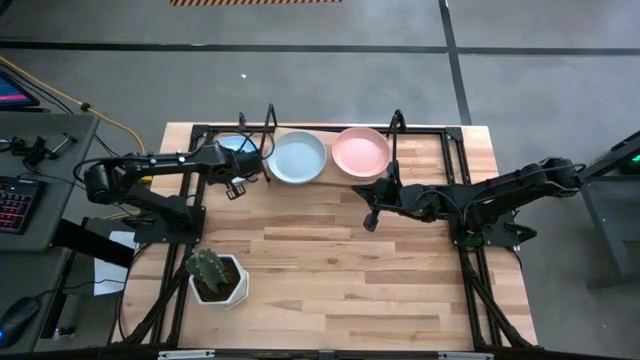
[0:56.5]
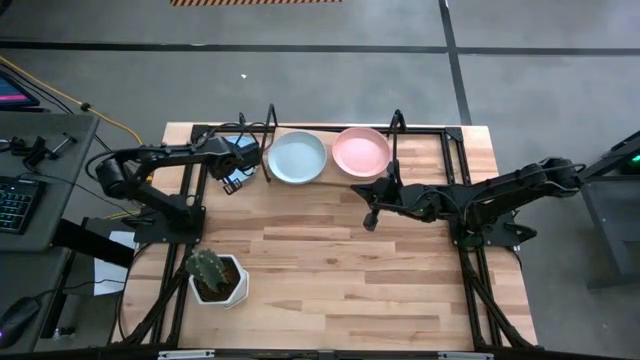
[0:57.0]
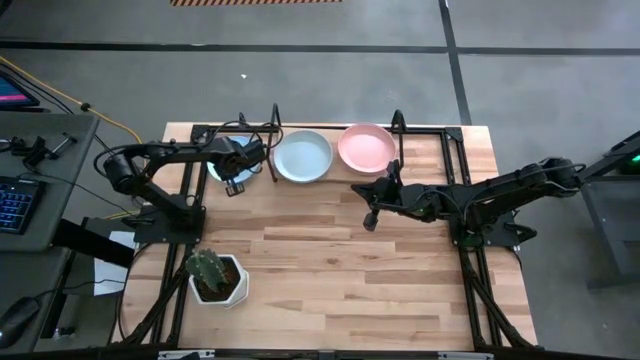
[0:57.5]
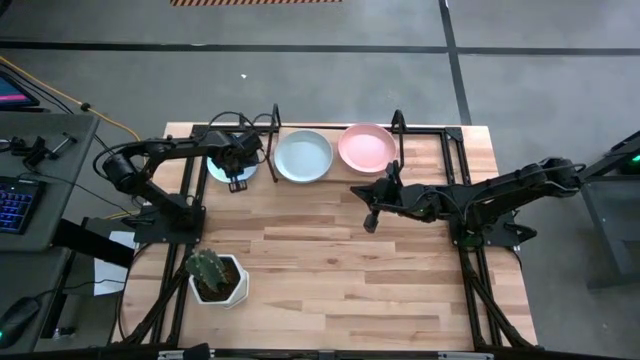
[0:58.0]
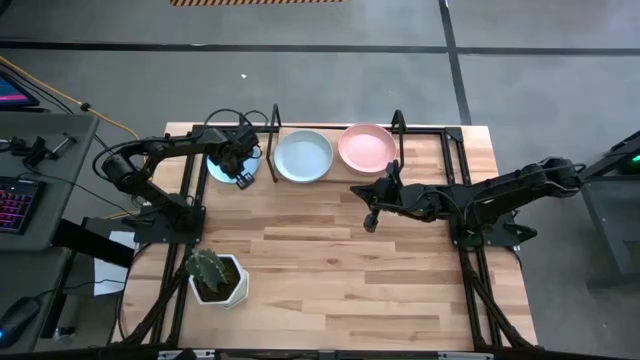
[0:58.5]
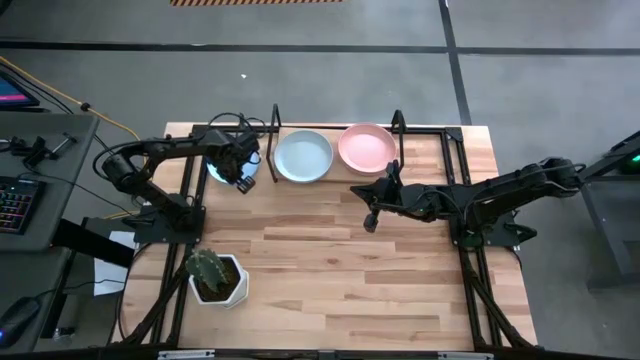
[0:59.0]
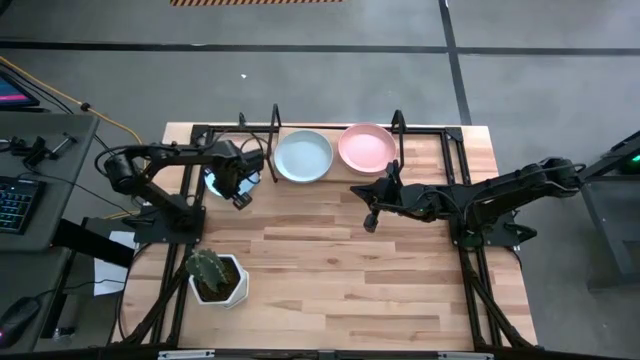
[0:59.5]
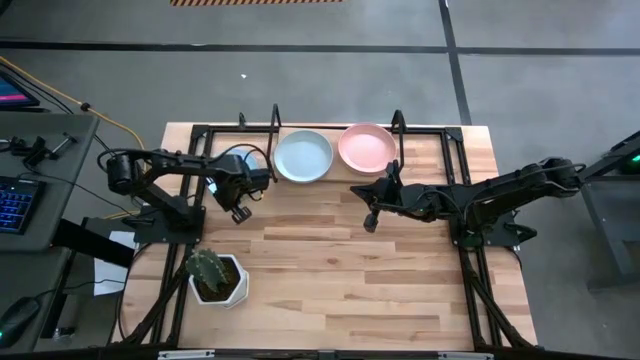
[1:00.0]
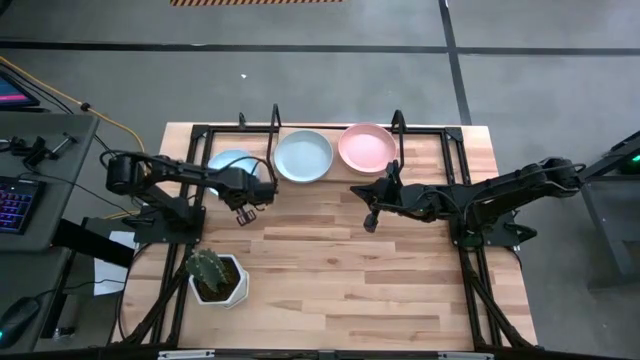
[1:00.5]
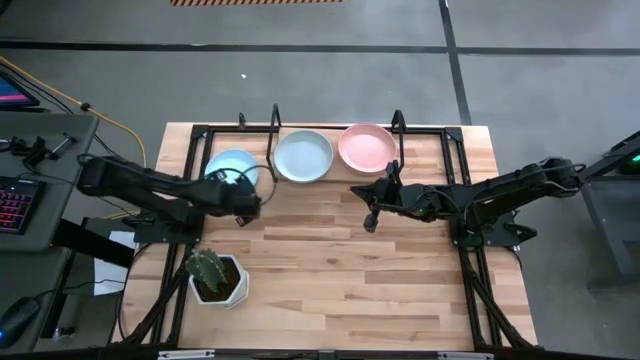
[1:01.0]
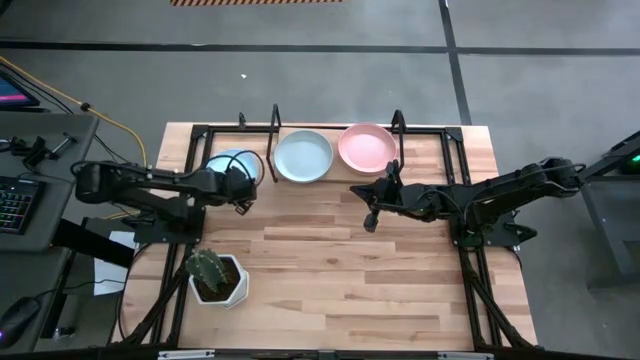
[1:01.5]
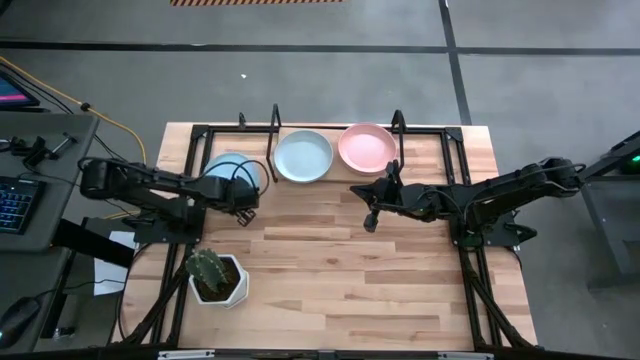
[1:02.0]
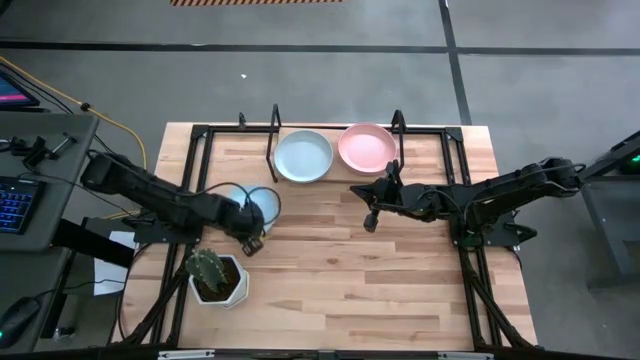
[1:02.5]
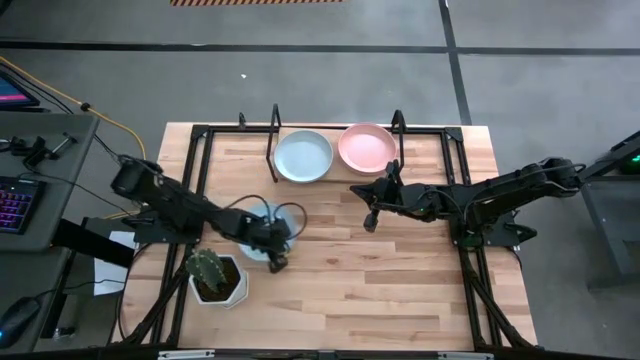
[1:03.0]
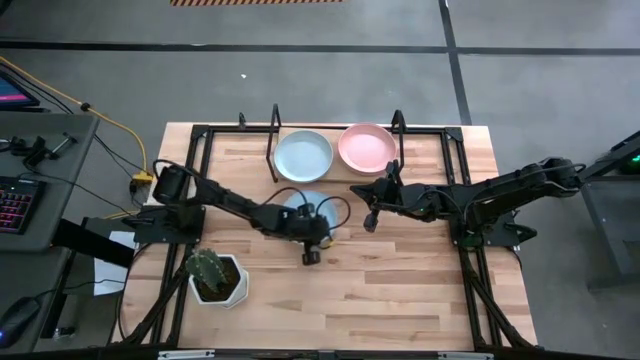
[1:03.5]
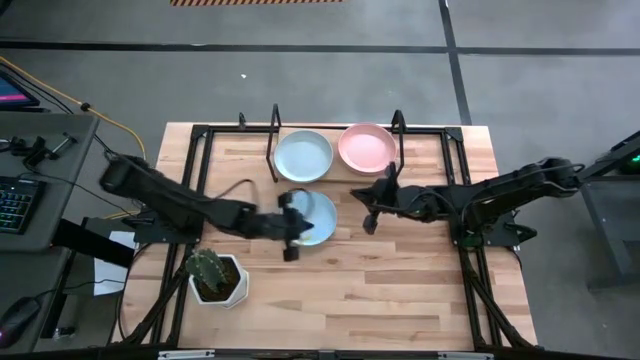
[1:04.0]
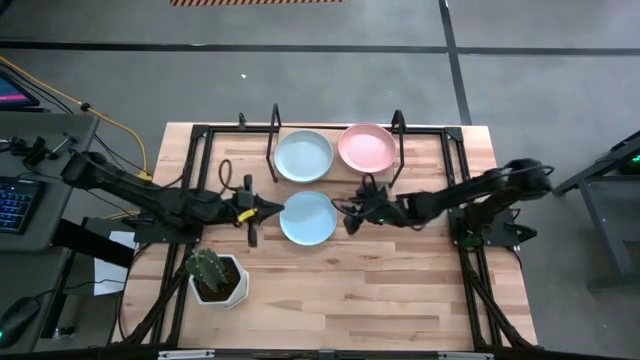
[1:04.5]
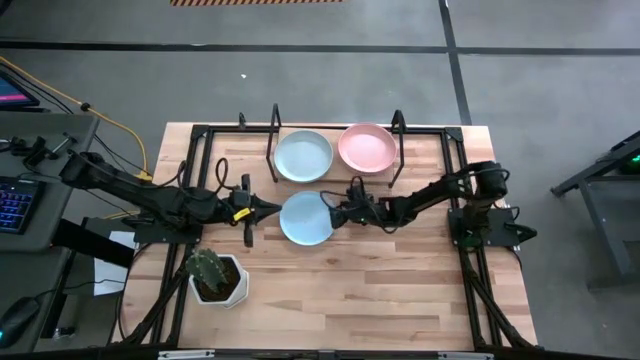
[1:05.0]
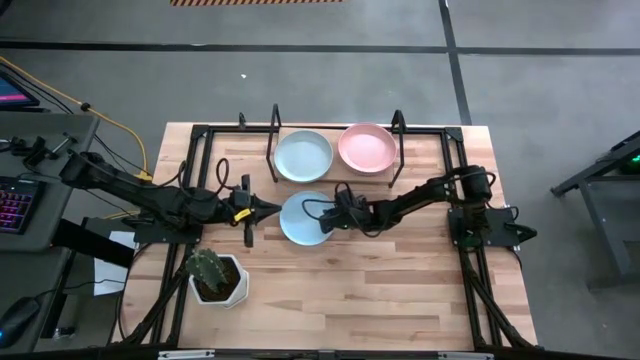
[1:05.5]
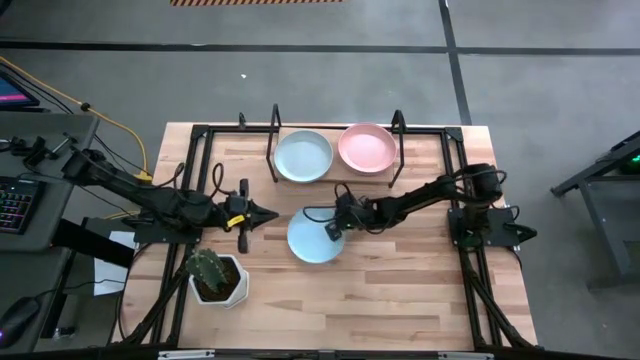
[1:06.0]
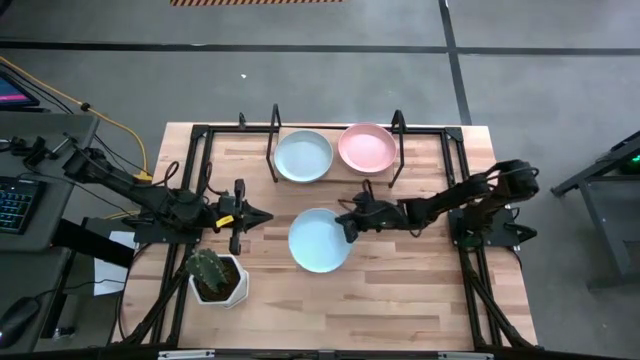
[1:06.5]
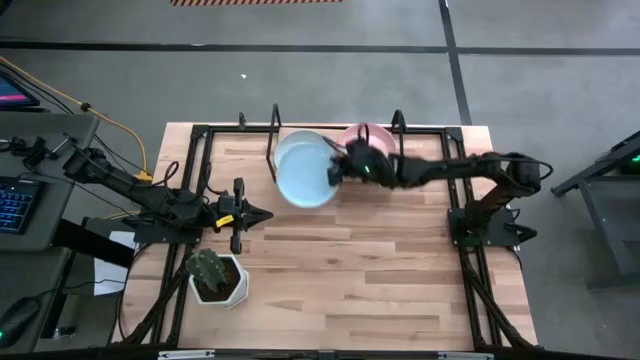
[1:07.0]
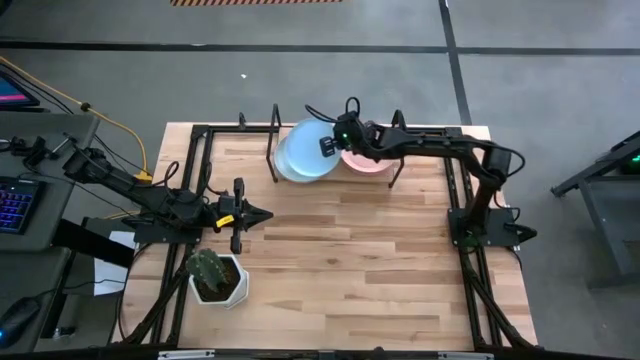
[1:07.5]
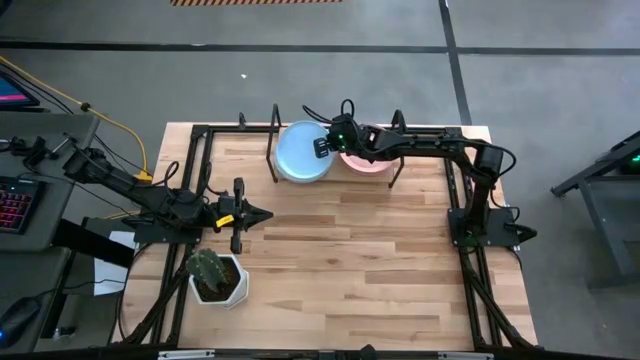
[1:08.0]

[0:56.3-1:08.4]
Task: Place and stack plates onto a shelf
Stack the light blue plate on top of the white plate on the shelf

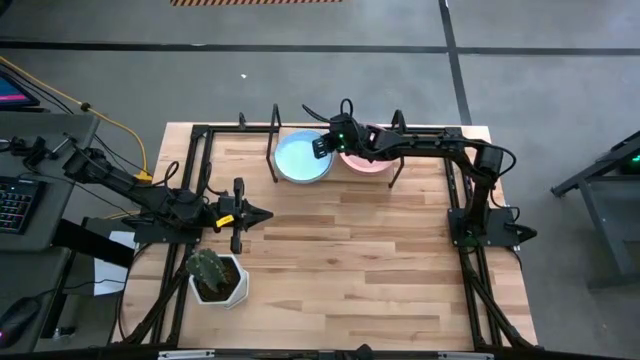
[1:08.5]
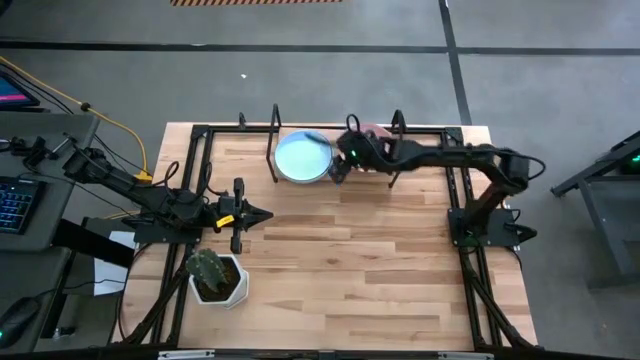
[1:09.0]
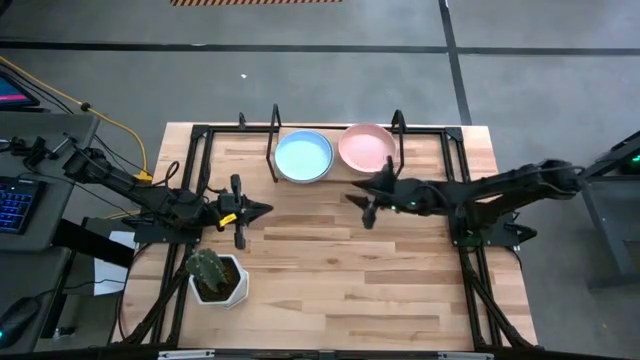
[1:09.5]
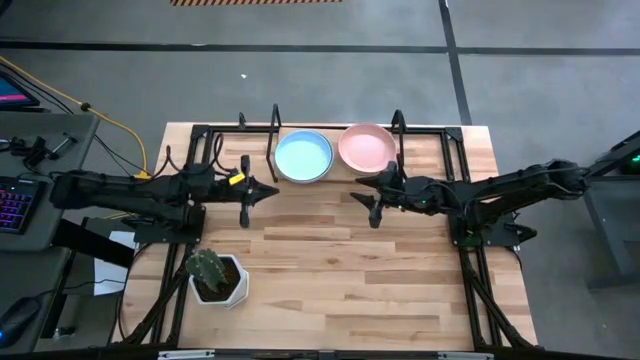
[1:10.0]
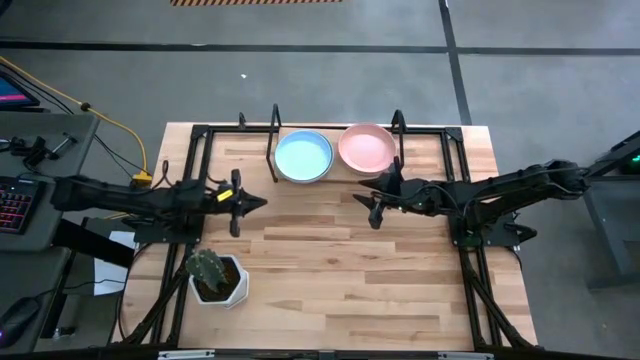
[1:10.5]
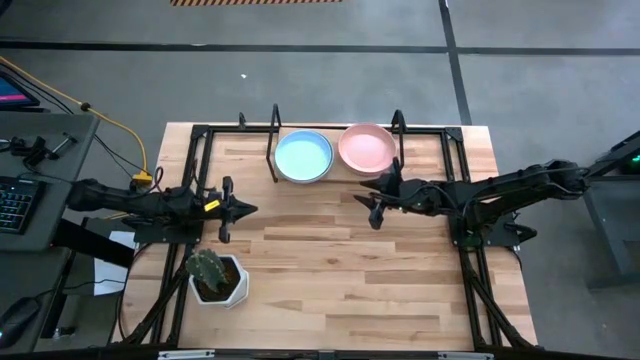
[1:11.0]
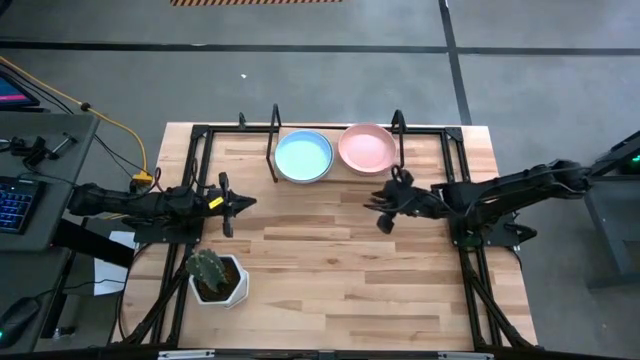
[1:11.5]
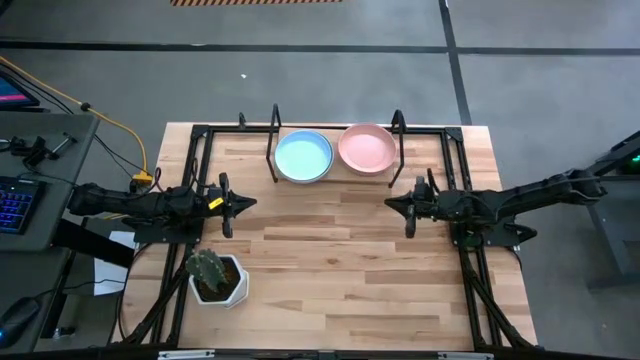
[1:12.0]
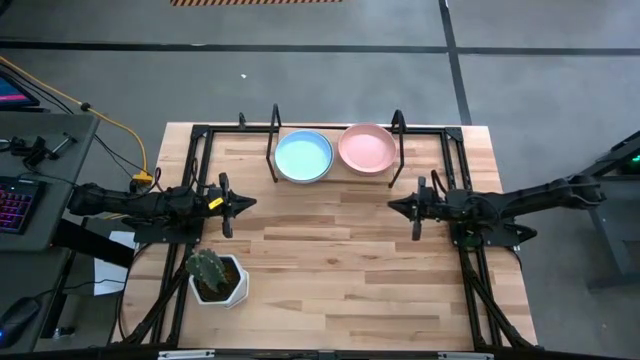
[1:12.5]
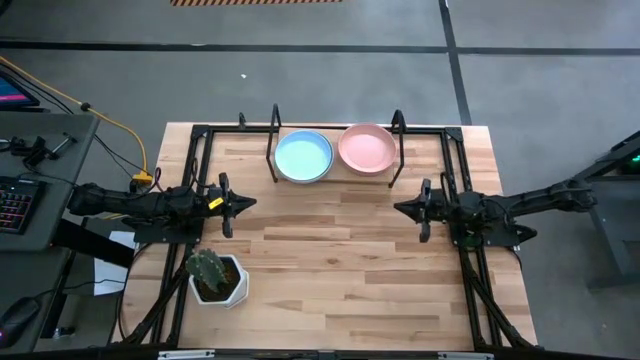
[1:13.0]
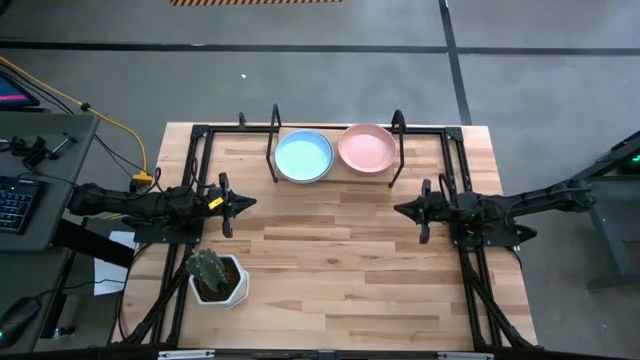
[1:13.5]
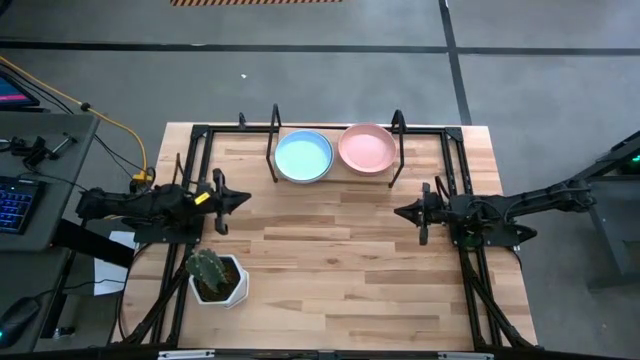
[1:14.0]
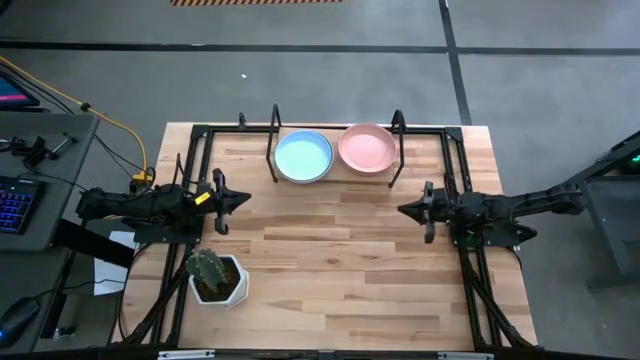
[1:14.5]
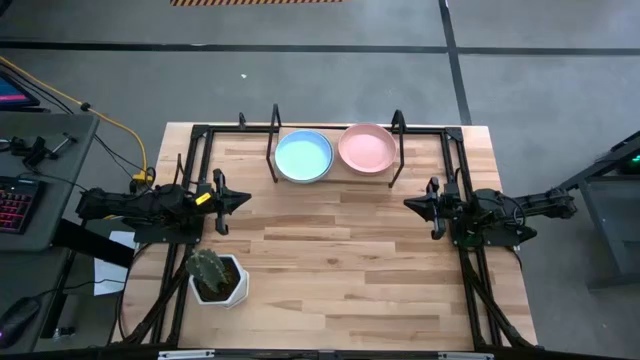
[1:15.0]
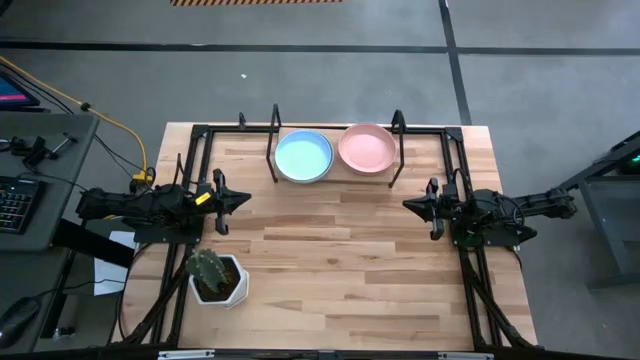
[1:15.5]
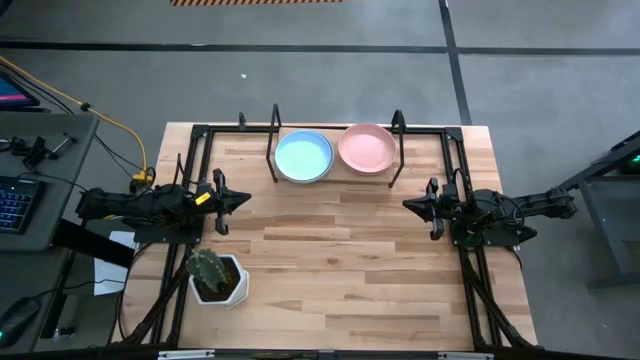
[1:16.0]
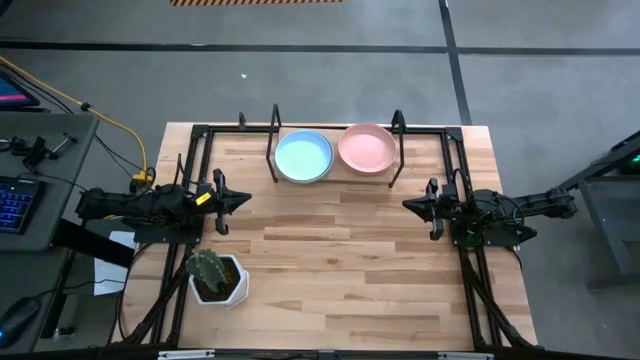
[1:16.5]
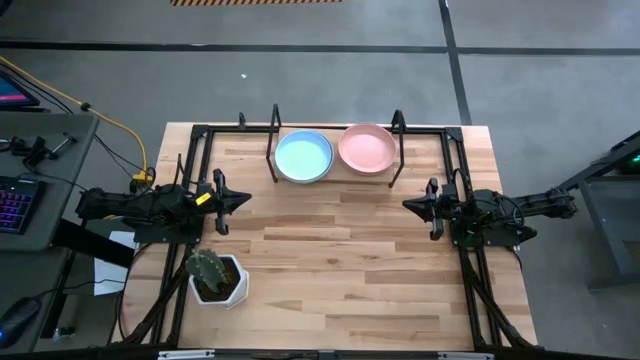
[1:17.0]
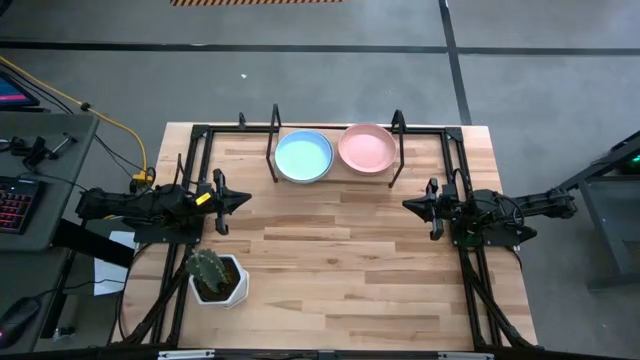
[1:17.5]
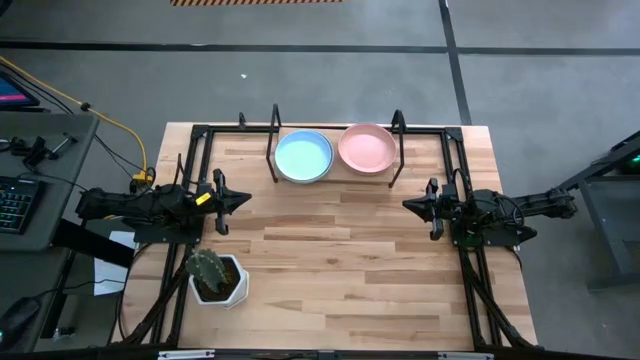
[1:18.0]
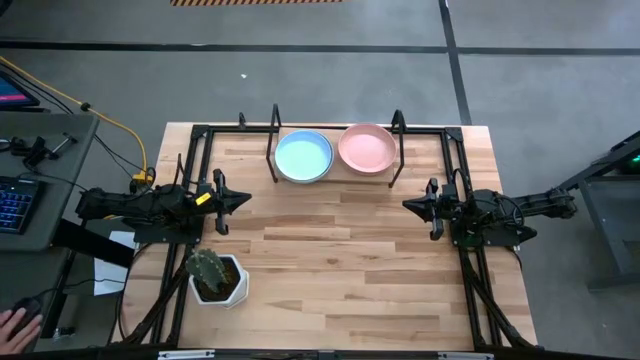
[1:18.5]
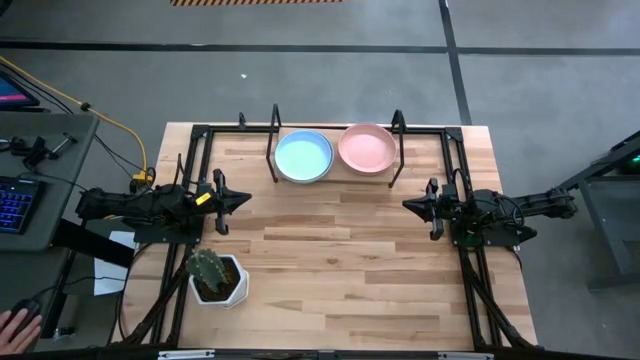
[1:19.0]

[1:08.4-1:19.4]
Return to Home Position
